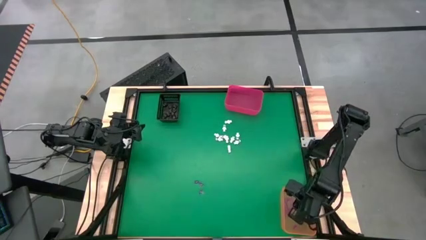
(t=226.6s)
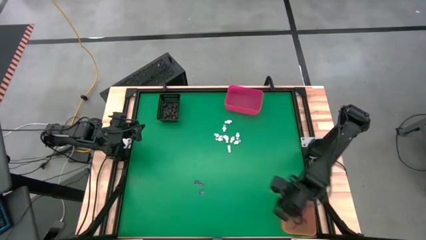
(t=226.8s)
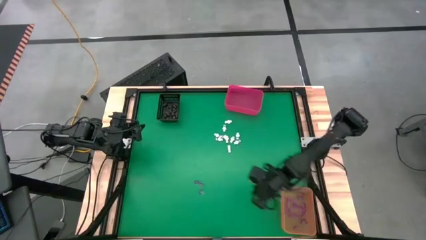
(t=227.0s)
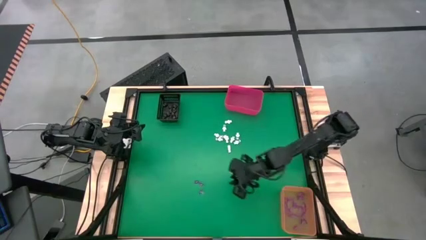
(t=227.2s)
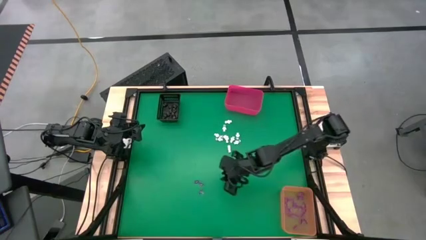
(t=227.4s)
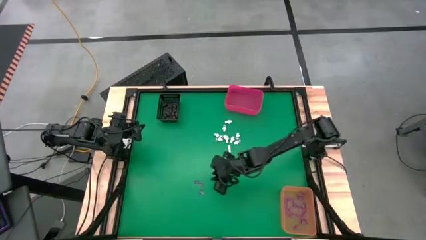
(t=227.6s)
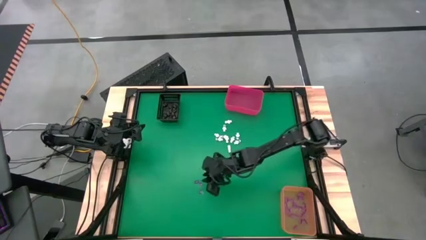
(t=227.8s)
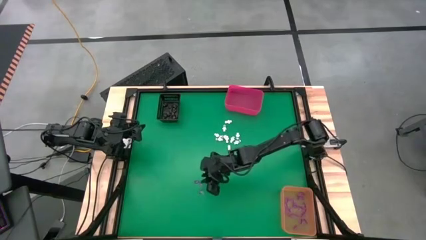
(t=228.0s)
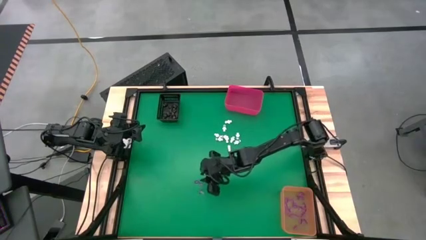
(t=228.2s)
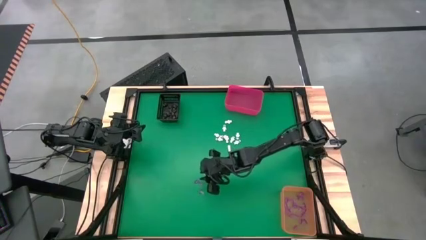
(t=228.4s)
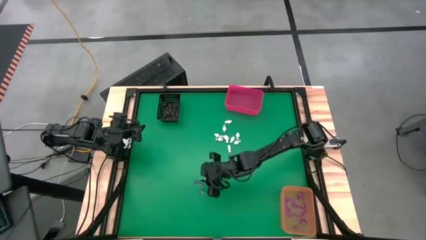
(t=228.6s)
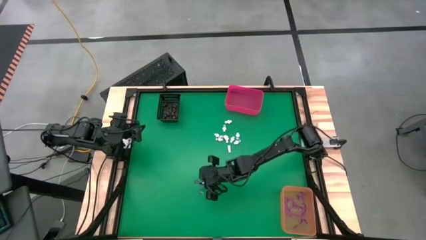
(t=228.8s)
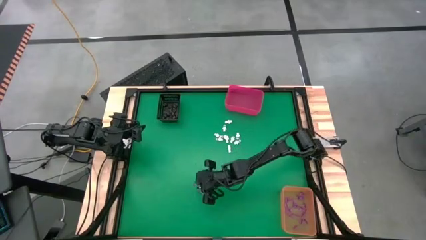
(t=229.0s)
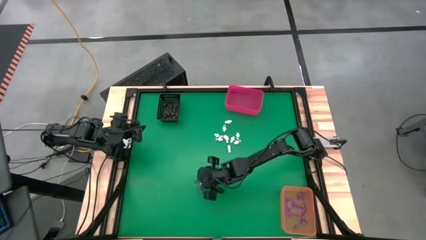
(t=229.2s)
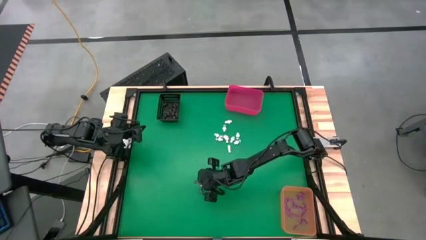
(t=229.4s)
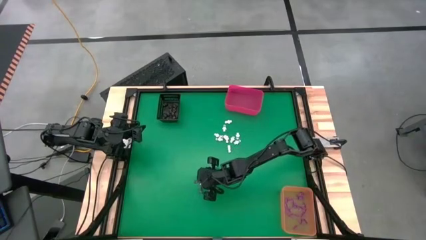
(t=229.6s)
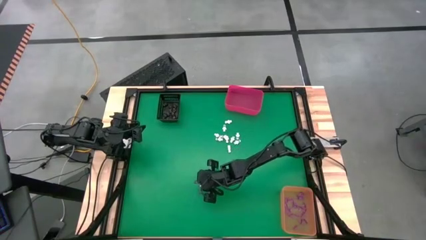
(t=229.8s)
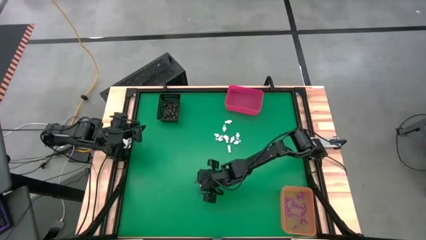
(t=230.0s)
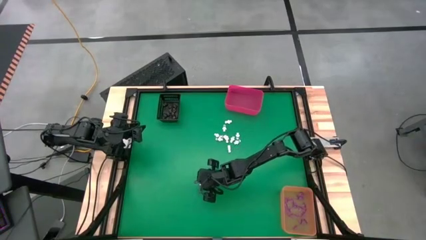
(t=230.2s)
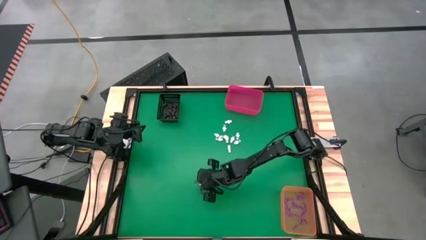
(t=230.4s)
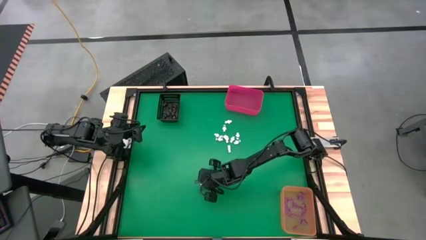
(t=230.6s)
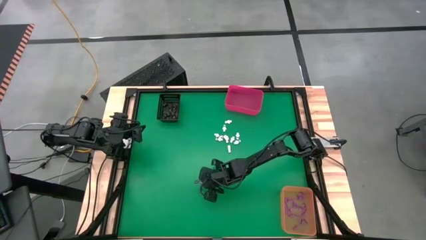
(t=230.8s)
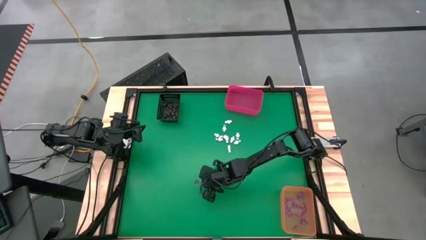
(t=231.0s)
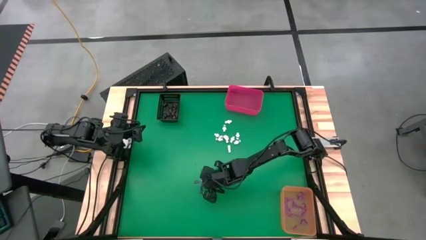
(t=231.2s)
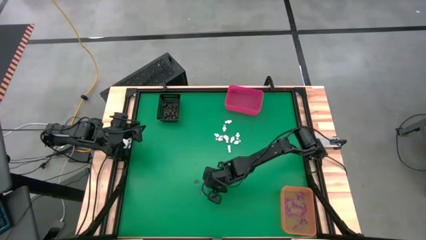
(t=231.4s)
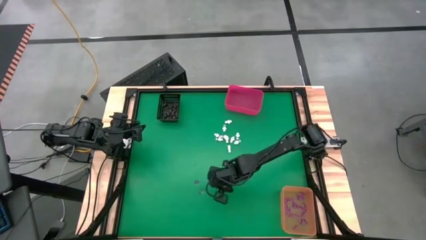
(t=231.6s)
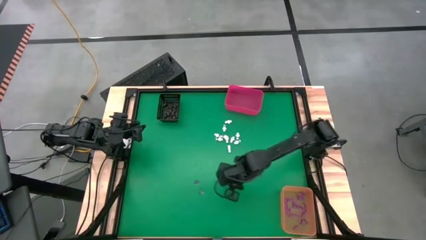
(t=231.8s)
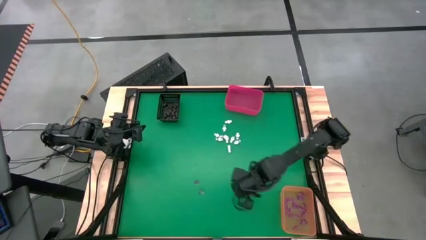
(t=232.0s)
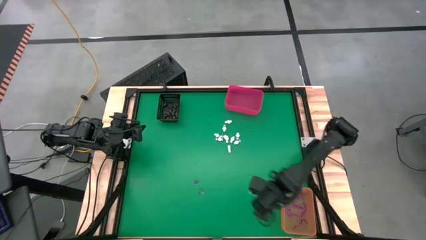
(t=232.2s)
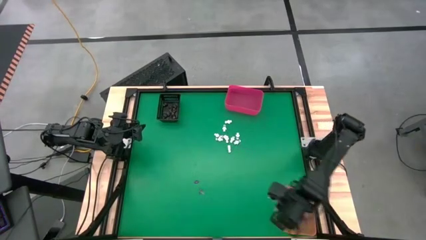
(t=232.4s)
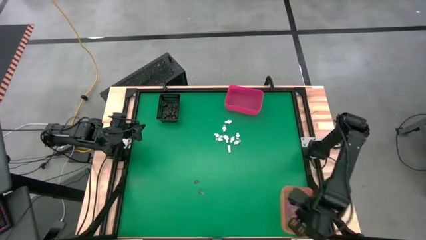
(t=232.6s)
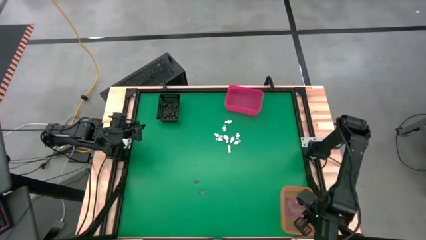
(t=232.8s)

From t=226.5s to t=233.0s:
Task: Sort Halloween decoration
Put the pink witch hat toy into the orange bin

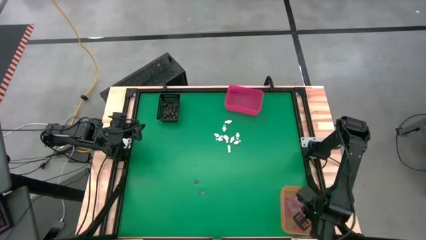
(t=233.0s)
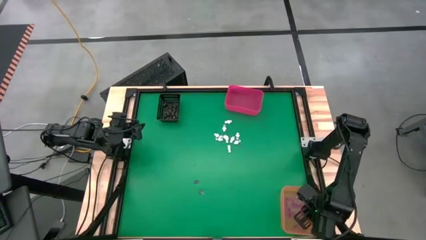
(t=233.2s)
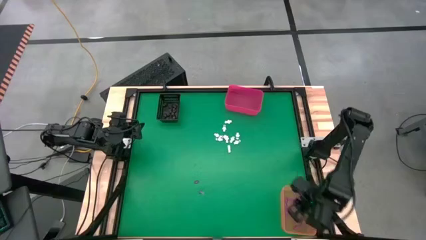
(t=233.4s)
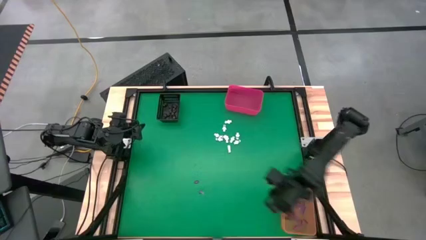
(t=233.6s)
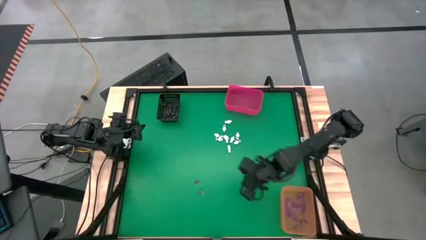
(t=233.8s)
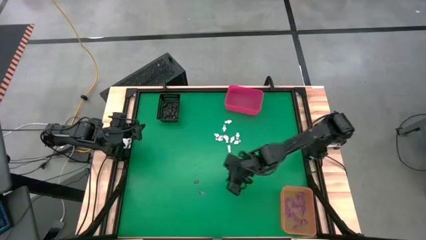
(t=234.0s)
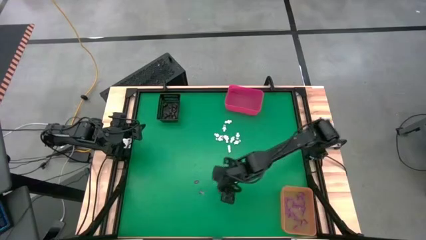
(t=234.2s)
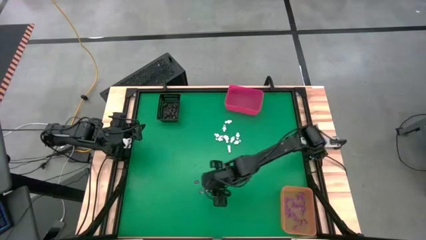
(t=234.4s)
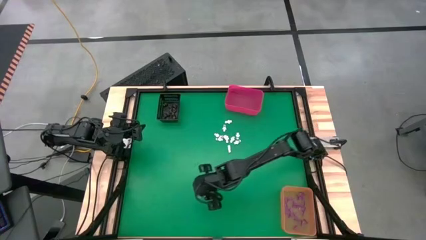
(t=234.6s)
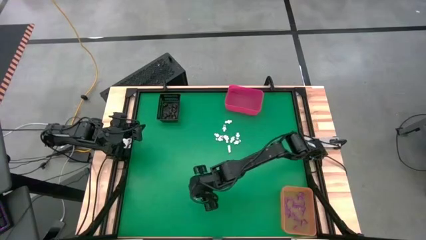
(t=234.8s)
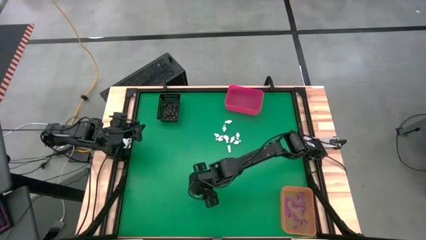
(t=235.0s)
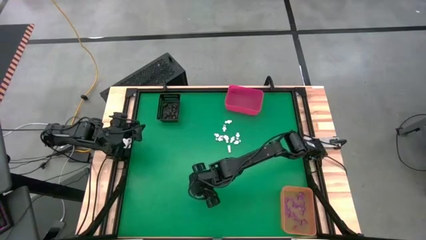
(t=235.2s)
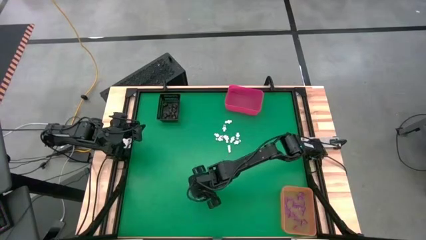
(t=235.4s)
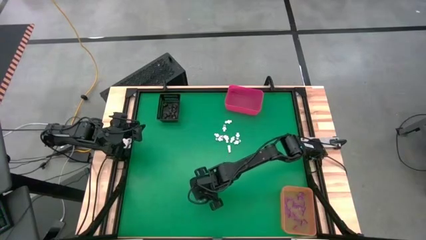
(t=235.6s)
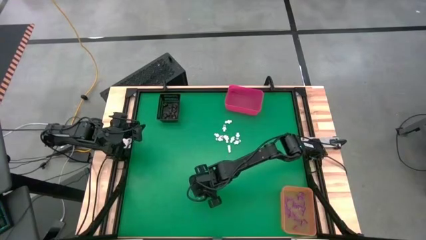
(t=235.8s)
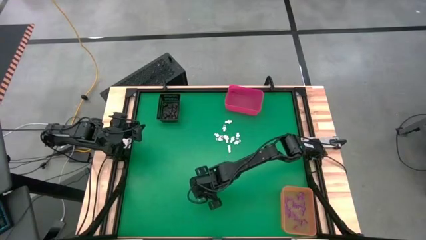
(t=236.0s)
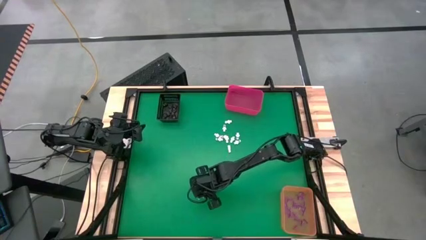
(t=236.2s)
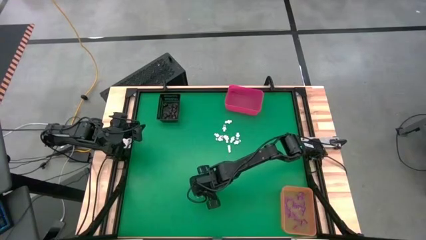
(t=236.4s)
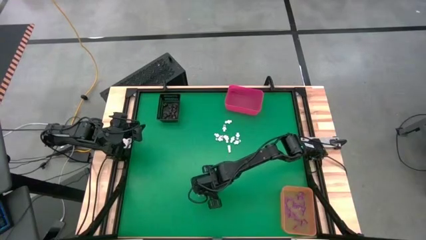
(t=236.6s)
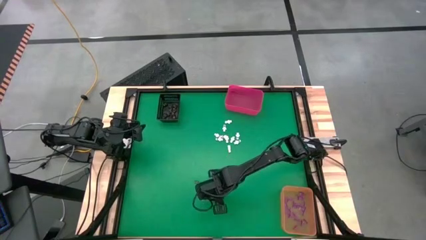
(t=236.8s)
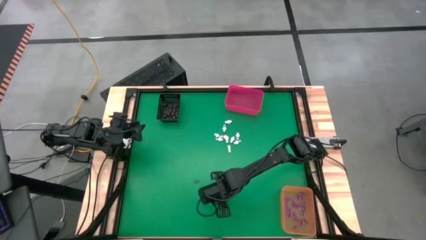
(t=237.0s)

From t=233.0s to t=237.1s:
Put the pink witch hat toy into the orange bin

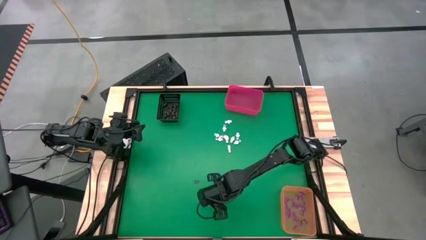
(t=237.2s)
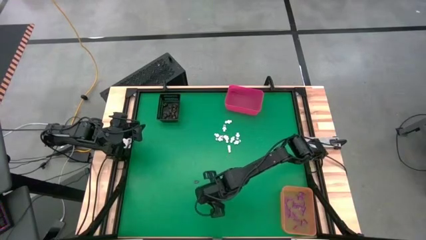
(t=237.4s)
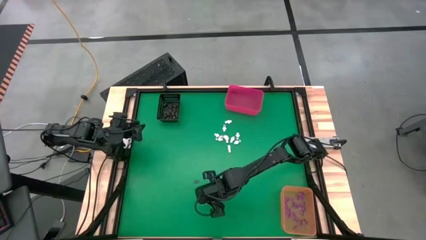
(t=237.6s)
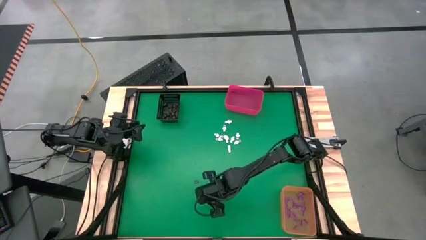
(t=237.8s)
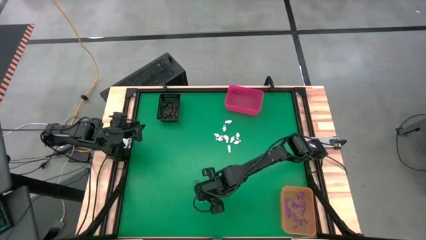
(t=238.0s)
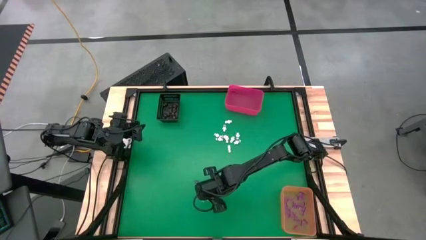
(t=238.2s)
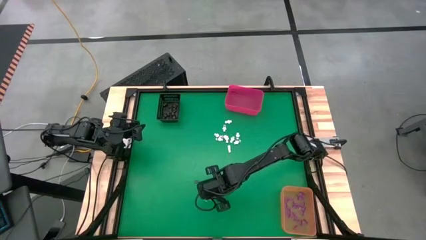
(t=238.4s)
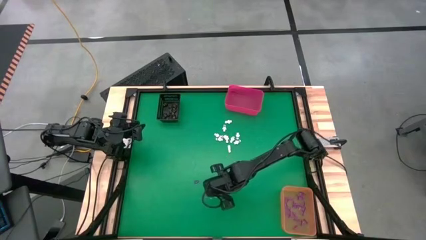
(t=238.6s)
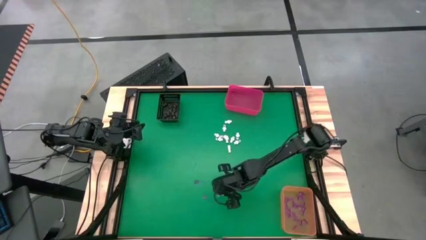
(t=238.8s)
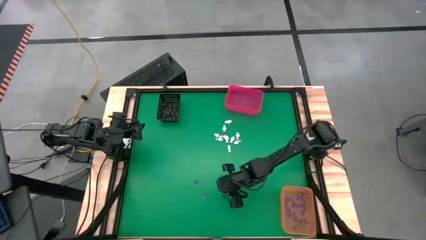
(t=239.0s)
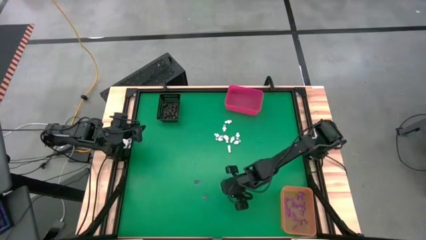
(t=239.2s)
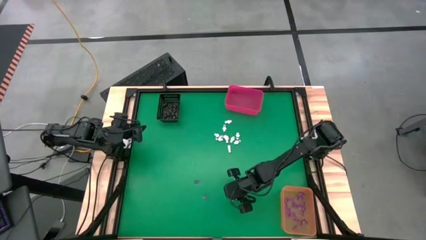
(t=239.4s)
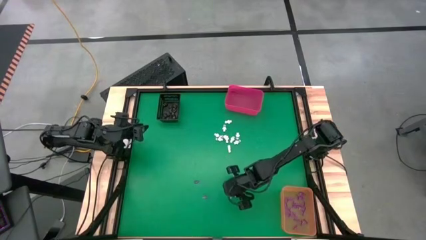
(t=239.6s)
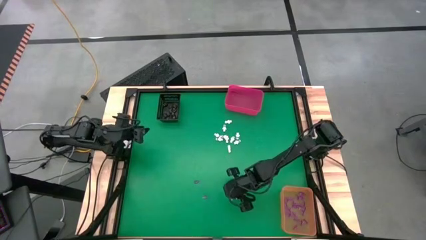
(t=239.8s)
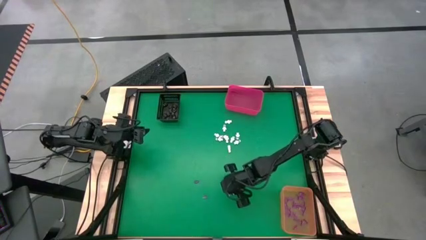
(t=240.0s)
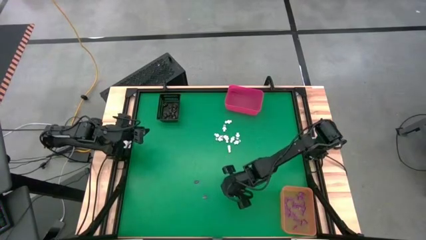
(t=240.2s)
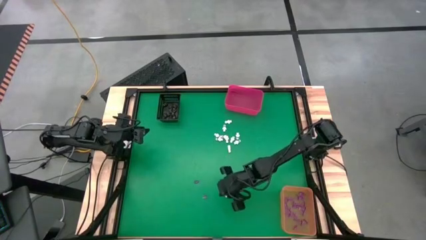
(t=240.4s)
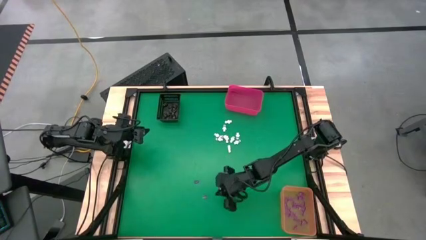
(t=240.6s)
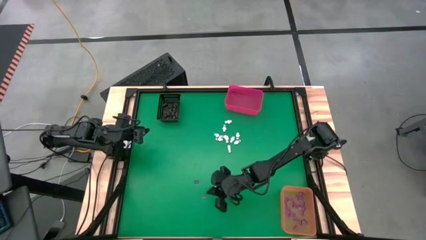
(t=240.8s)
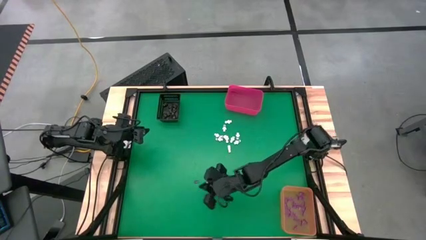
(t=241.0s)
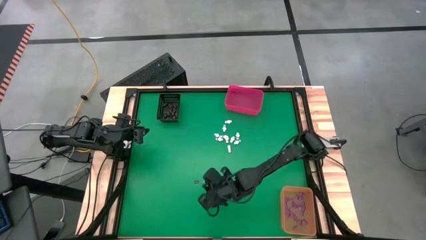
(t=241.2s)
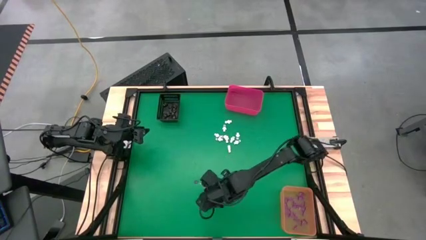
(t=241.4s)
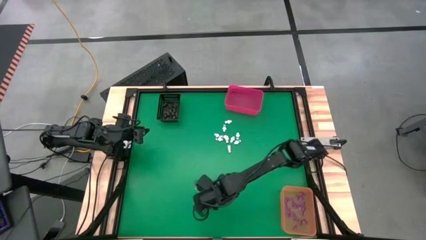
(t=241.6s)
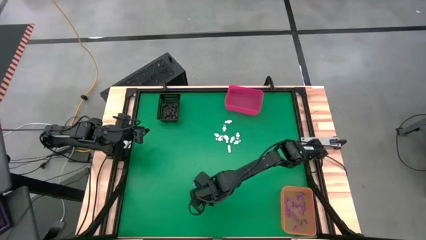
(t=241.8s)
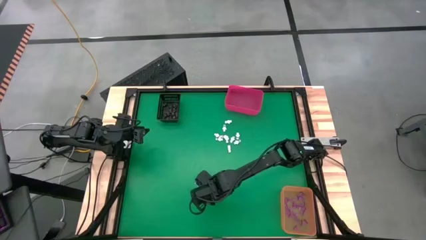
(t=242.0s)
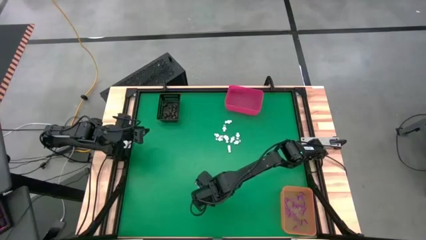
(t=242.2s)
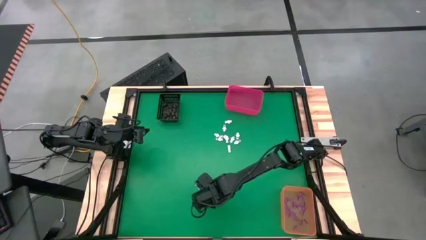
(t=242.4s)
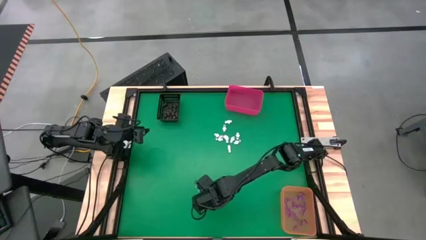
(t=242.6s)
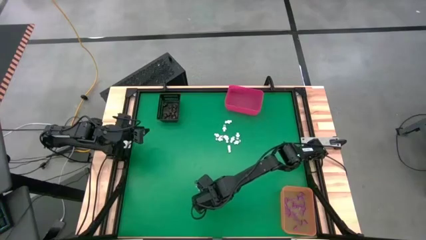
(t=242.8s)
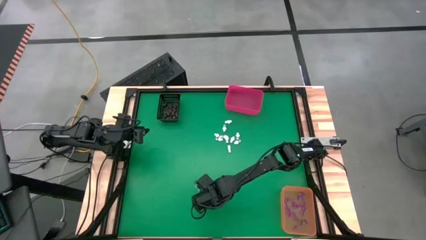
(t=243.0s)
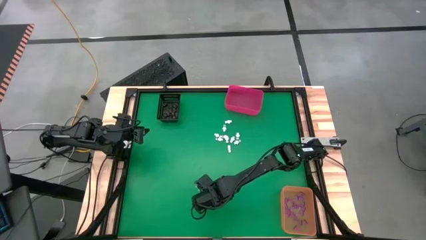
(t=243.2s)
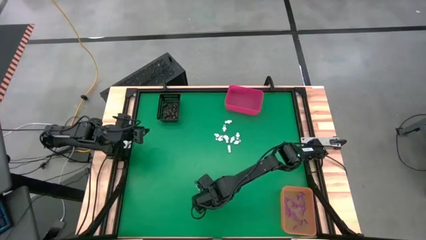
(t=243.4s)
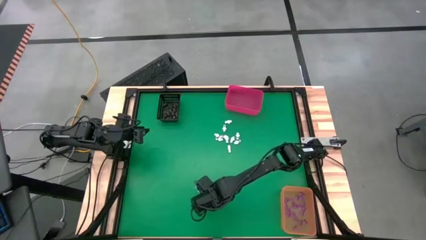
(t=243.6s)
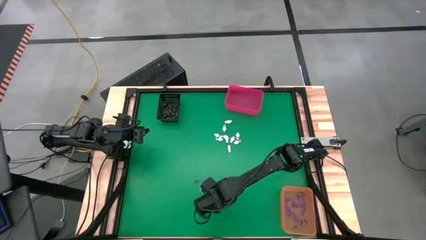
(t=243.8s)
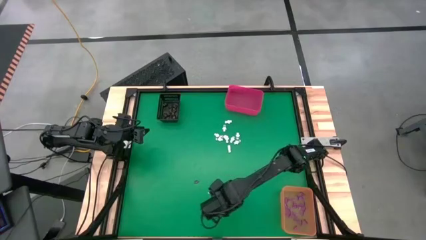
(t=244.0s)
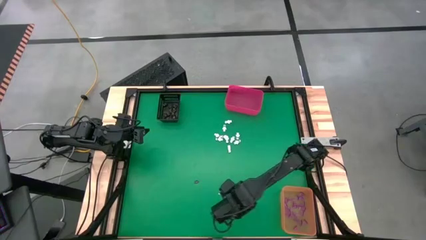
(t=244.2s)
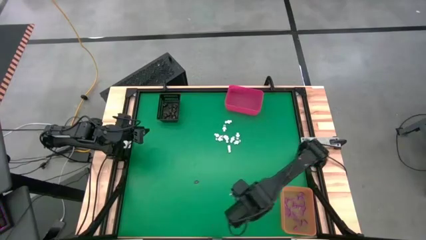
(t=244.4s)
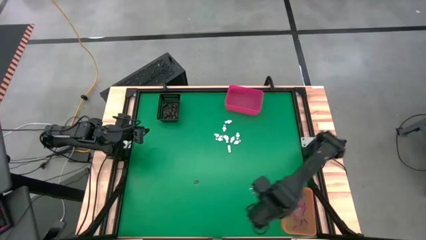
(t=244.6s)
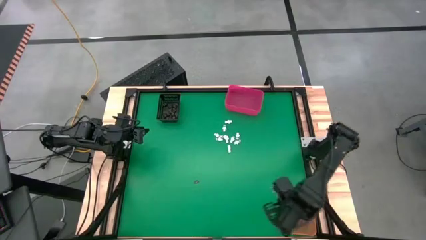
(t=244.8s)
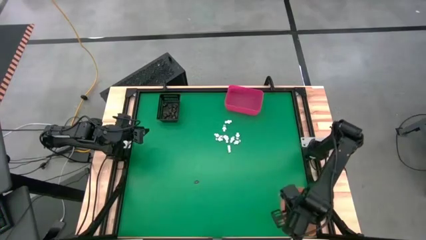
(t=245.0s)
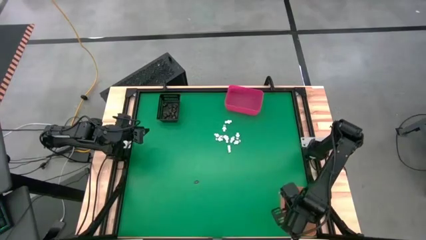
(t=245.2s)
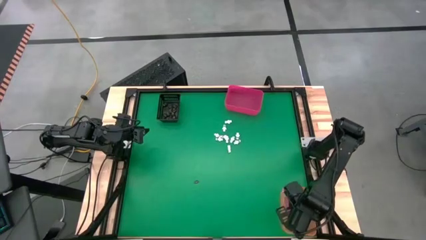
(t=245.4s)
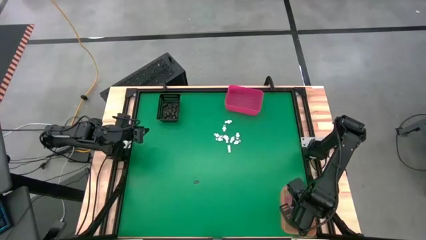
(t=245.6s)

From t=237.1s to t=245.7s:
Put the pink witch hat toy into the orange bin
